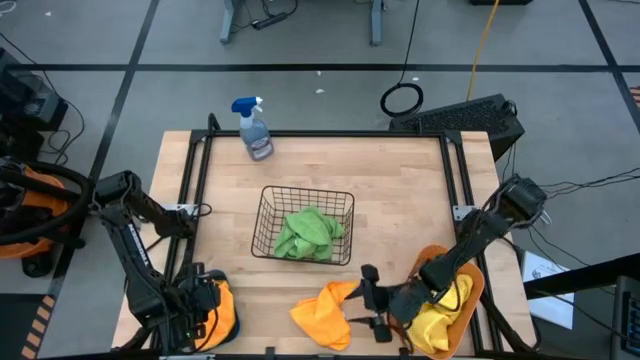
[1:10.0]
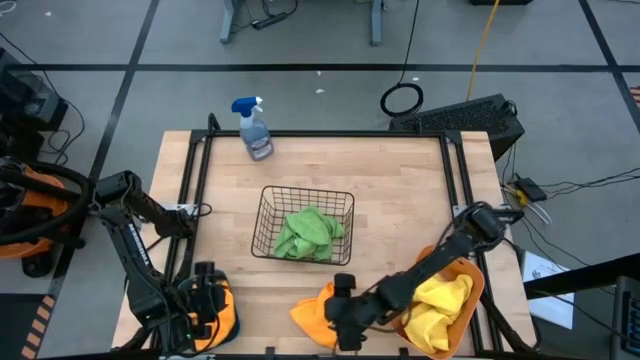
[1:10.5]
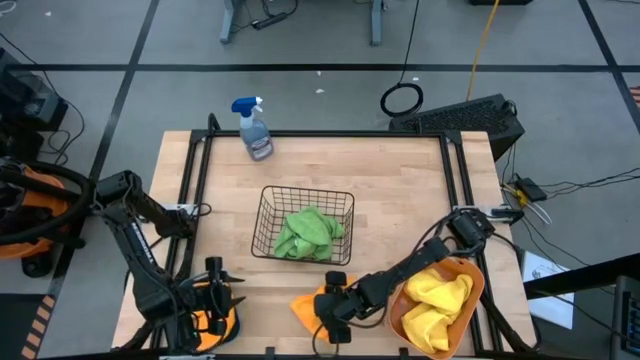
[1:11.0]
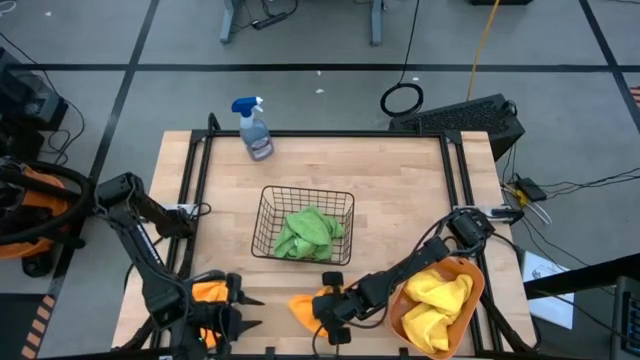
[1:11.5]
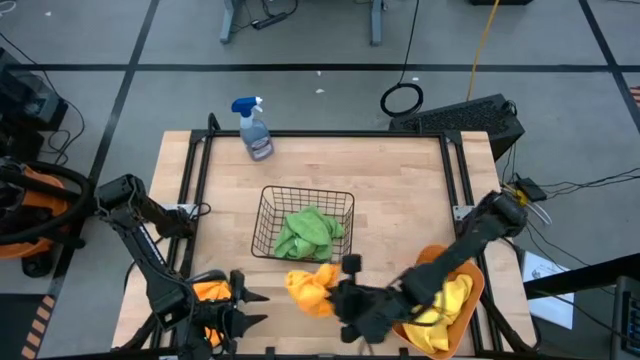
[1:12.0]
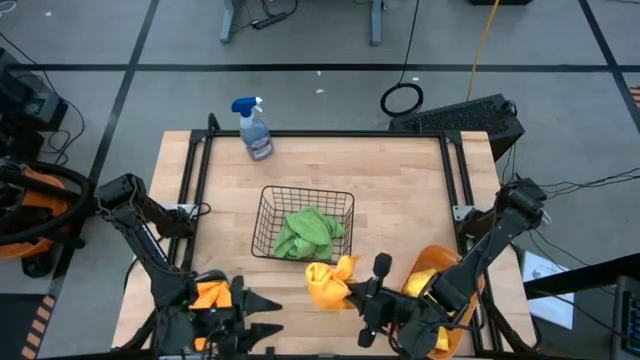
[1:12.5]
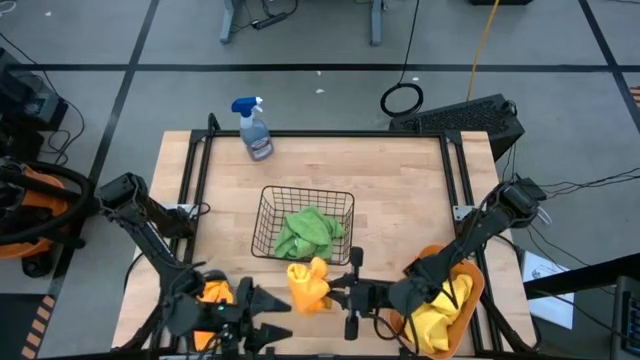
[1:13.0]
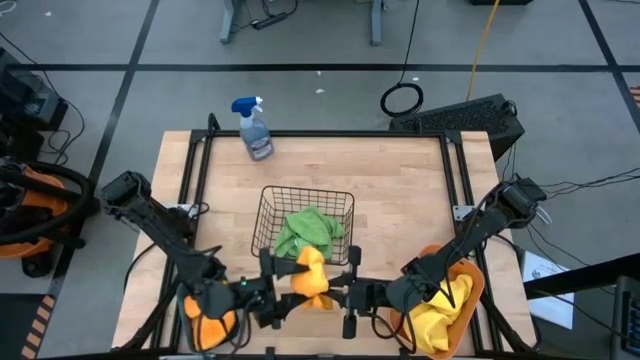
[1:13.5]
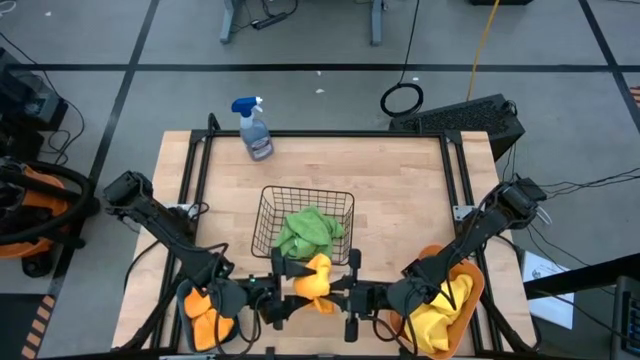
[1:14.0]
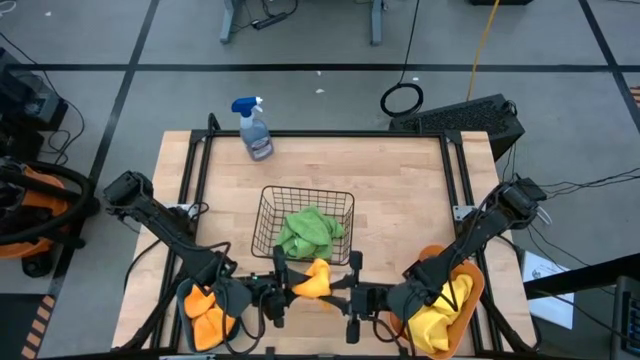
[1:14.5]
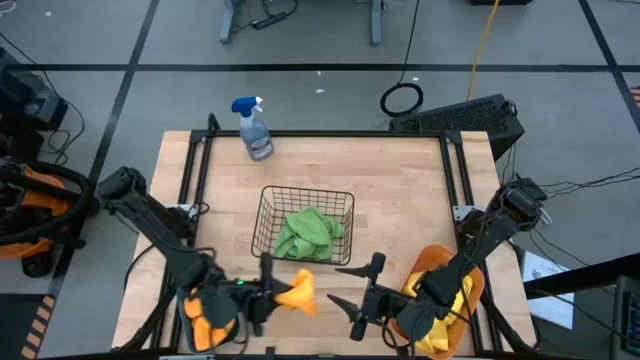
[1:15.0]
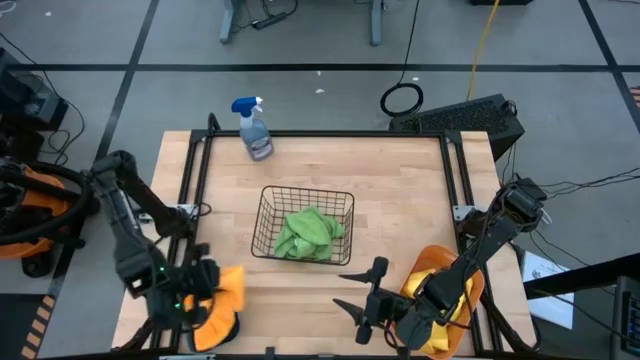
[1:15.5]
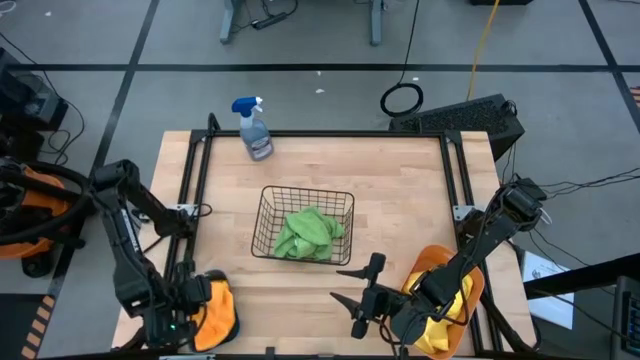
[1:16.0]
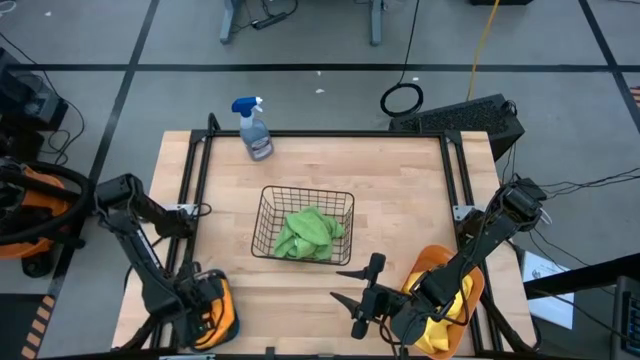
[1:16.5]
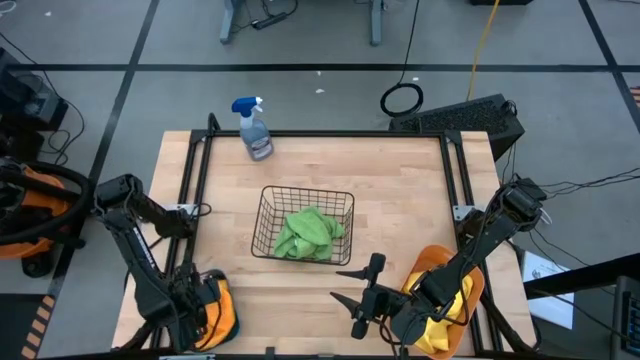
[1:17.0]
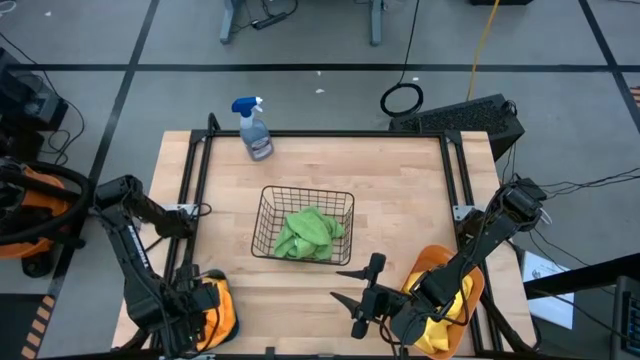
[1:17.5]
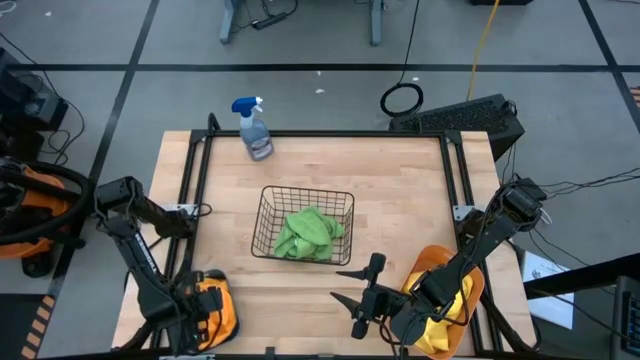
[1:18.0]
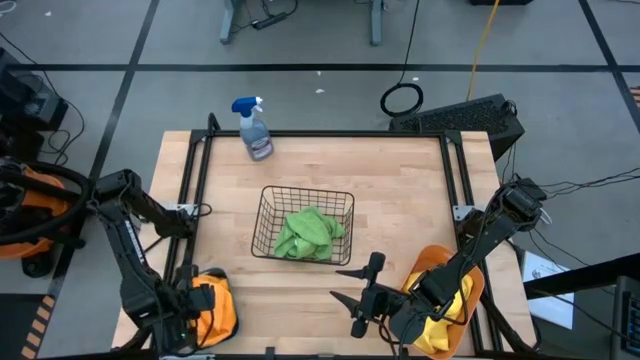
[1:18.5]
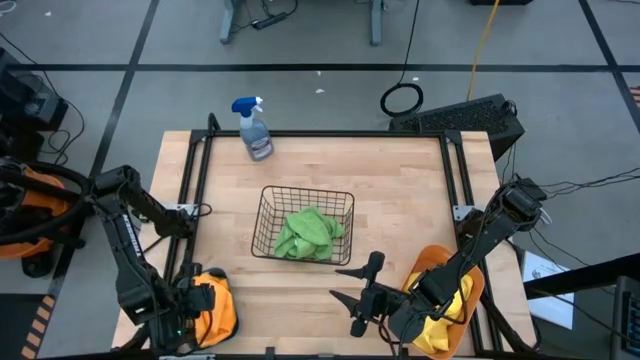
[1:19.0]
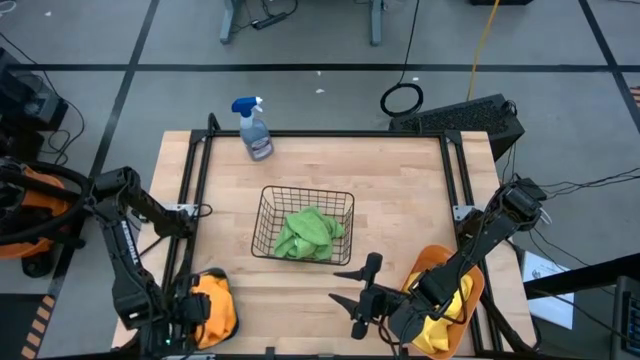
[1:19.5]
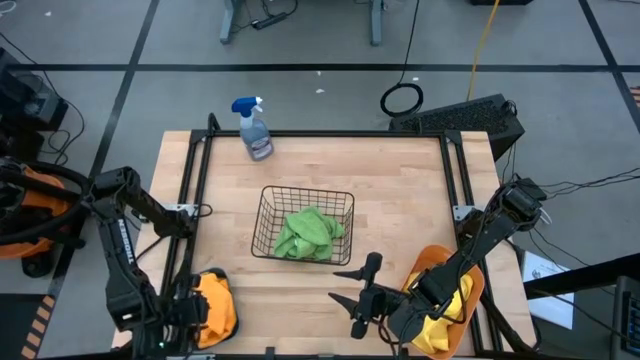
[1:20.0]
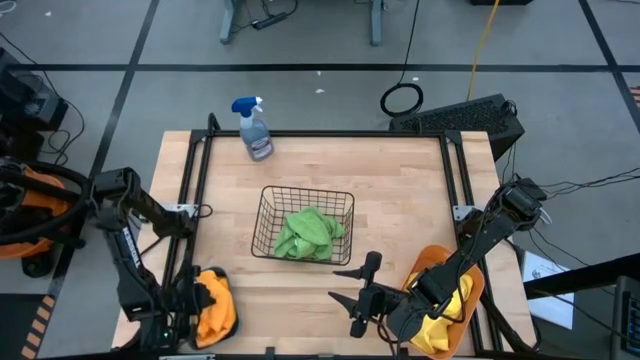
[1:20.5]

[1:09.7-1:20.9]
Task: Sort microfiber towel by color & place in baskets
Put the orange microfiber cloth into the blue bin

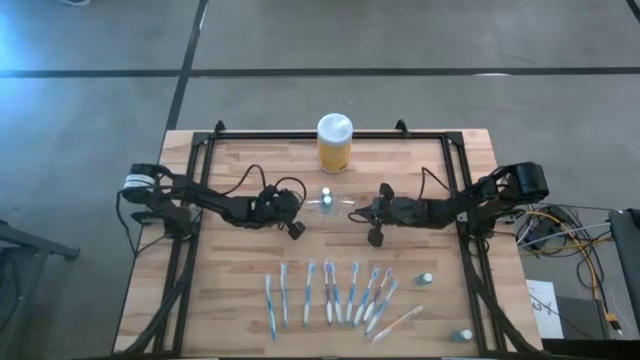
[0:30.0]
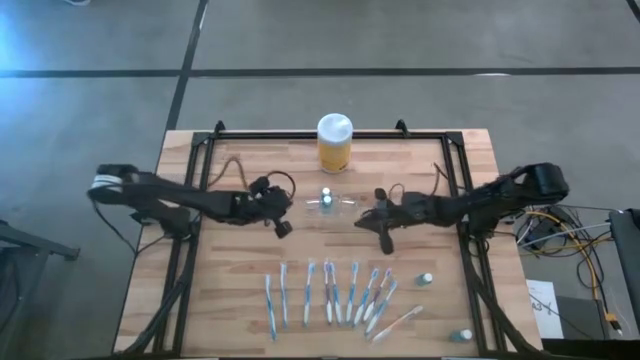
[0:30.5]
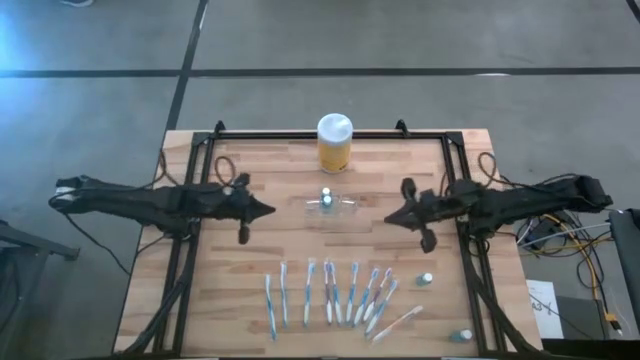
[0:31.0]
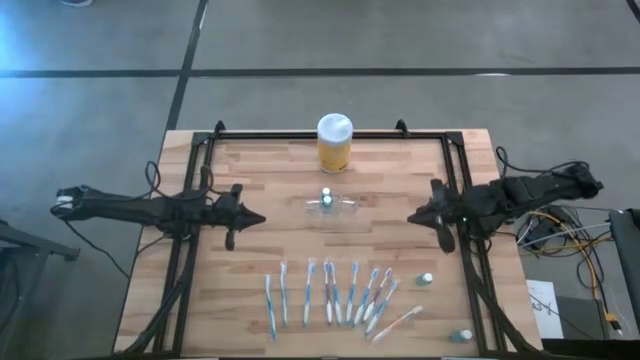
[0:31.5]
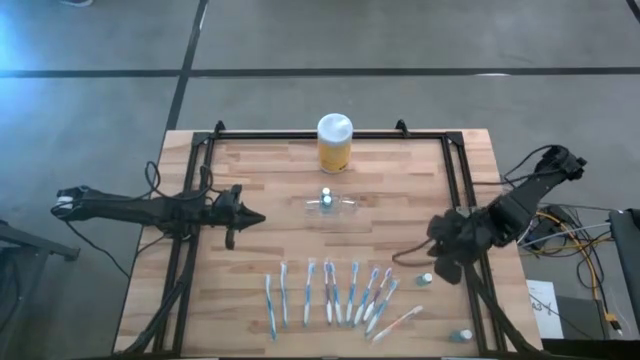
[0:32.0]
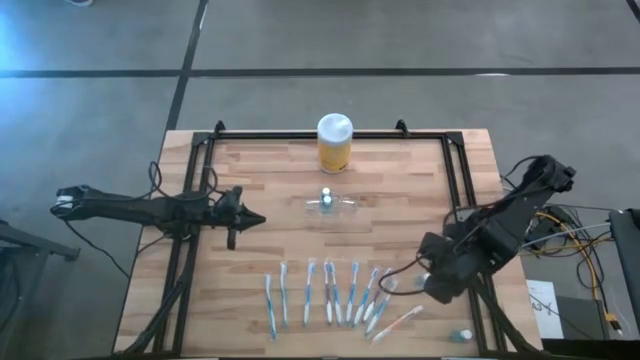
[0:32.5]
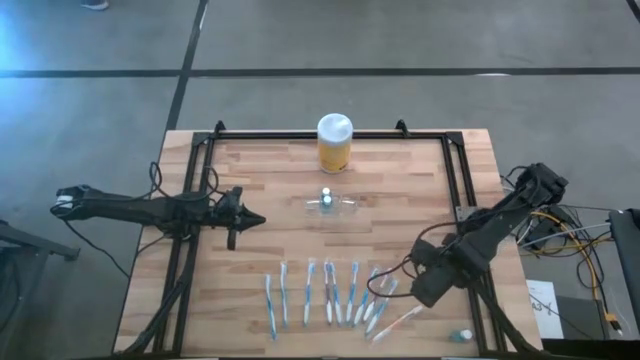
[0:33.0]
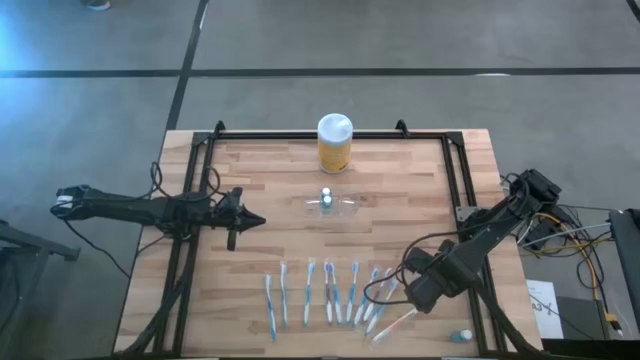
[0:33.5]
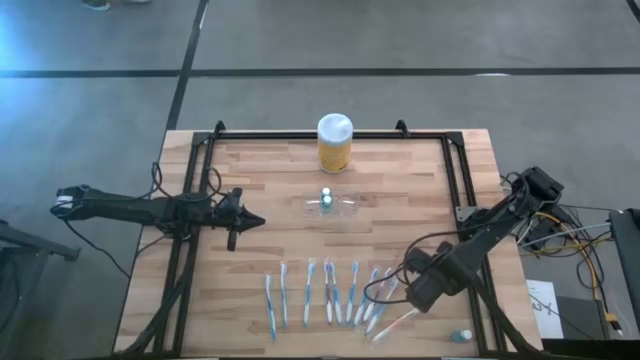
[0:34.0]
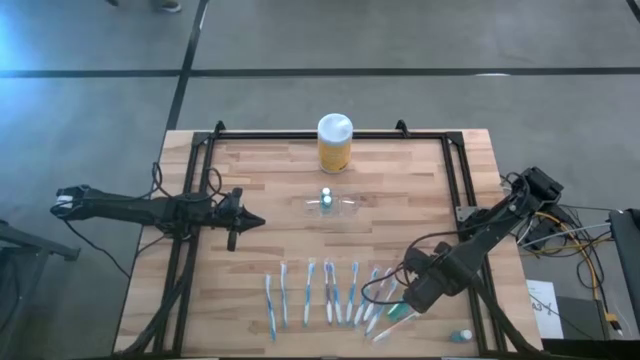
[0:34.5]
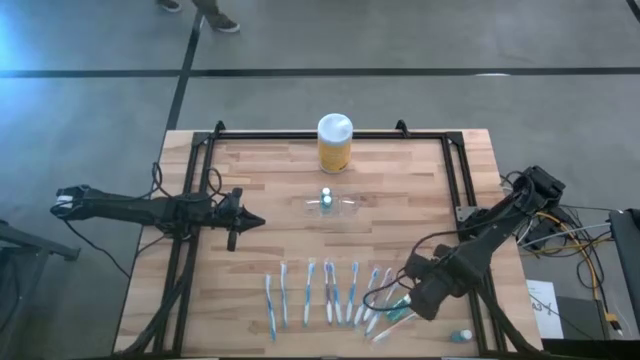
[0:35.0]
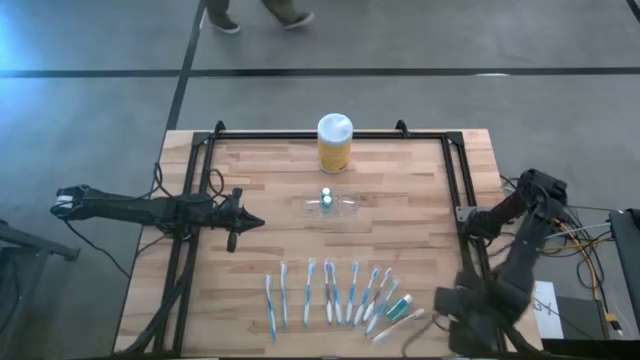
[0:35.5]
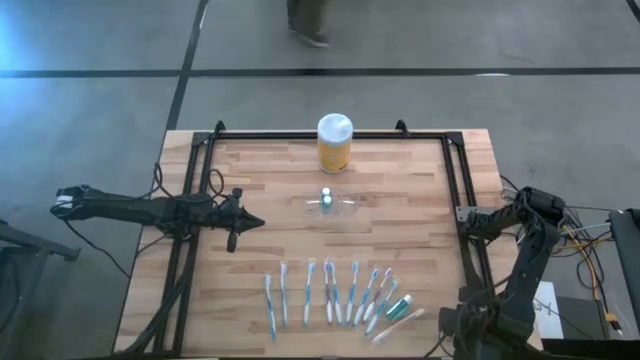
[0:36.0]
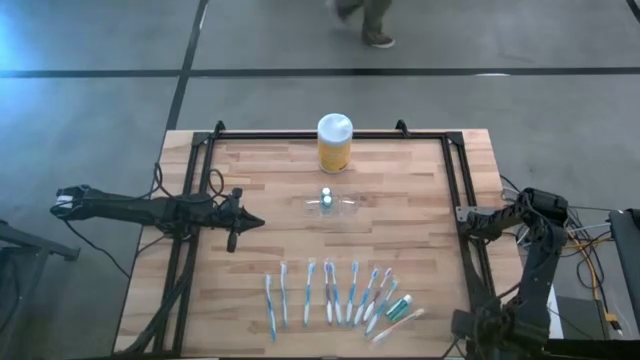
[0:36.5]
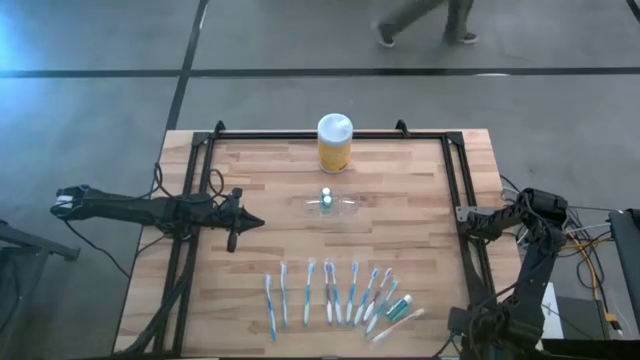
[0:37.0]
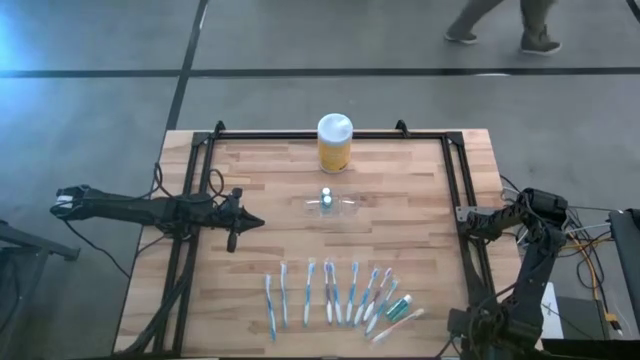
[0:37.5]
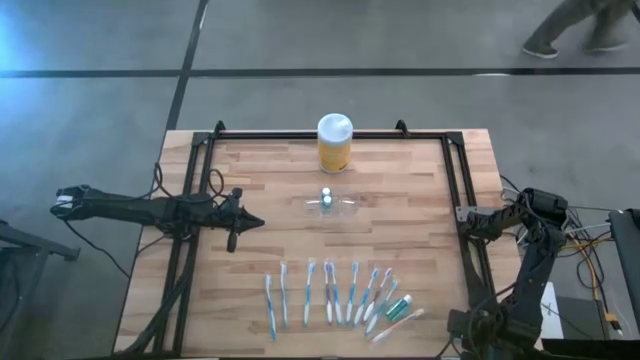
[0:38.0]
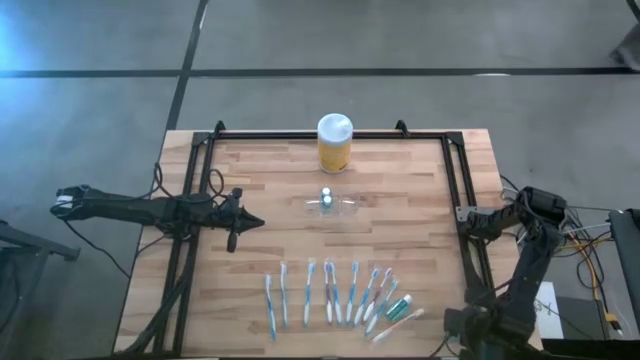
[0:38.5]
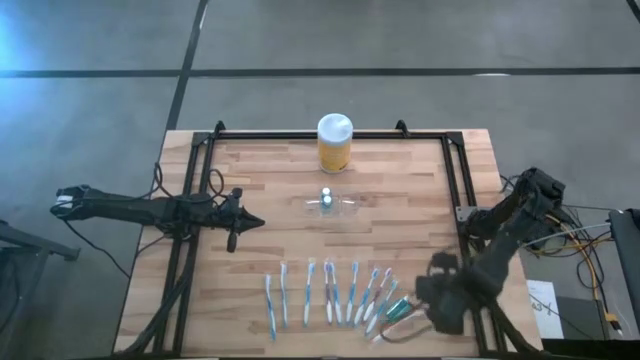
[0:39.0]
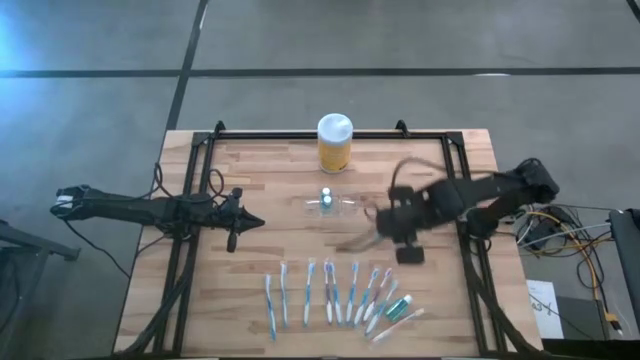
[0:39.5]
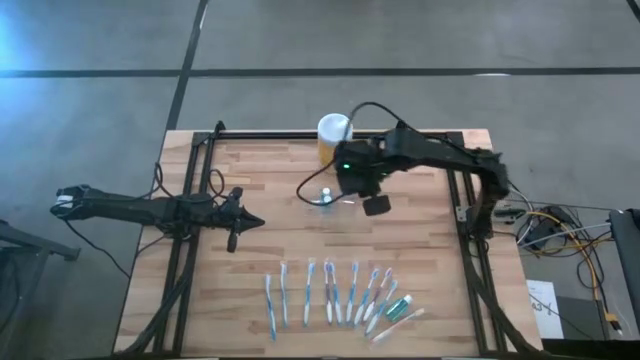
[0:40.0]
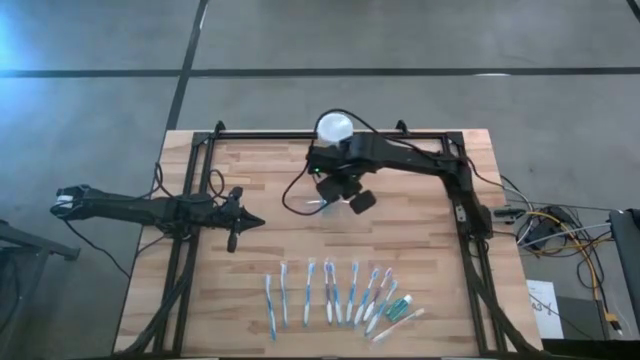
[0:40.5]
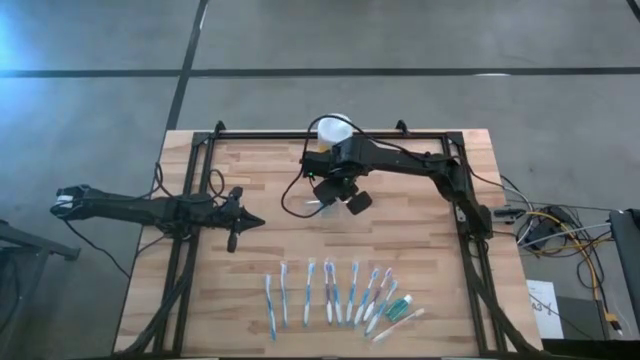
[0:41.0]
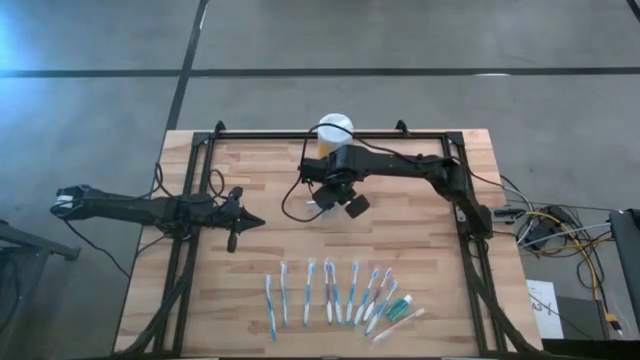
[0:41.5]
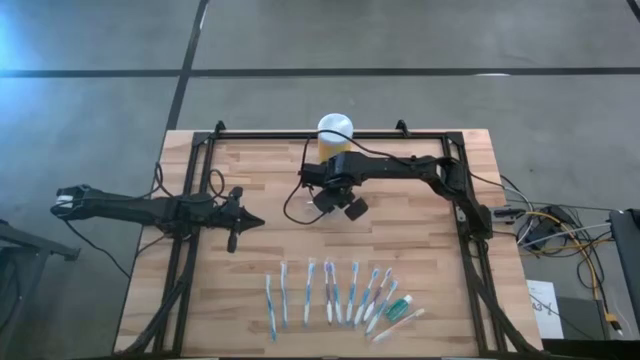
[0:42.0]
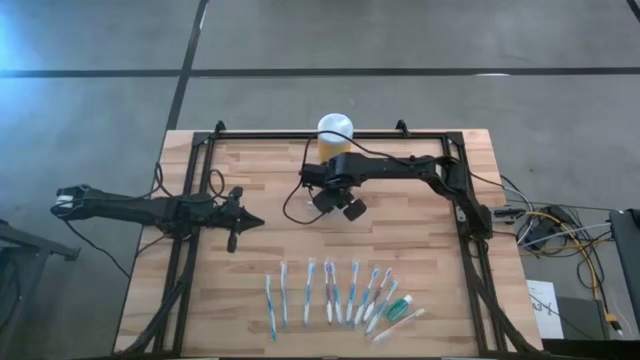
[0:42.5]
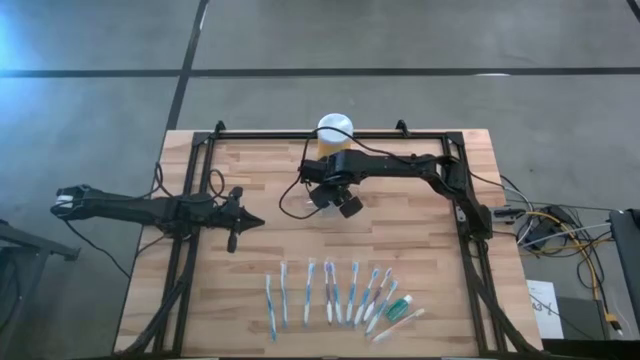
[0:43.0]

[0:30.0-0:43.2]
Task: Pick & Place toothbrushing station
Put the blue mouthwash into the middle of the transparent organizer
